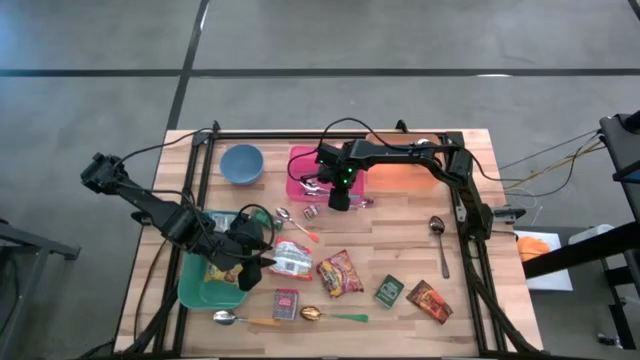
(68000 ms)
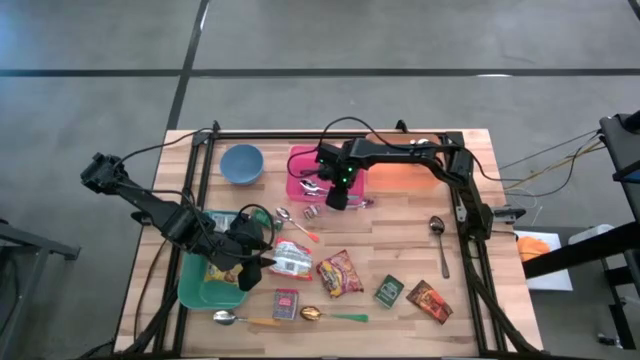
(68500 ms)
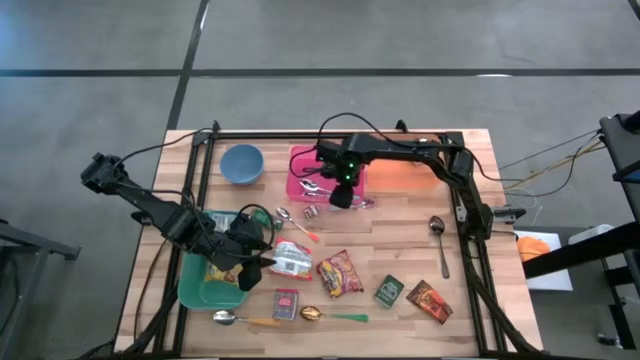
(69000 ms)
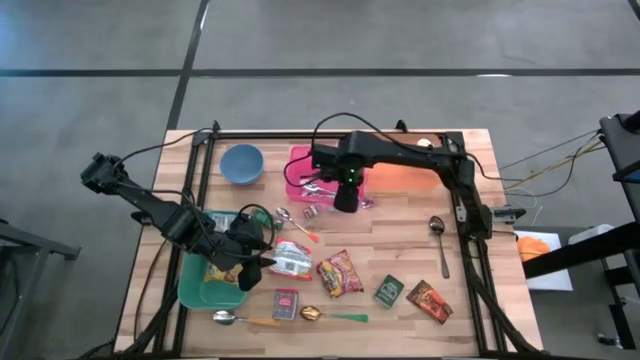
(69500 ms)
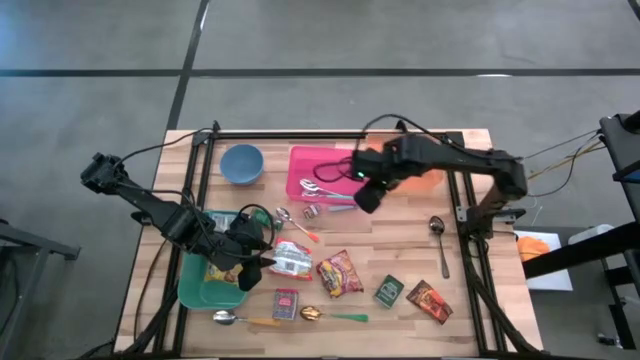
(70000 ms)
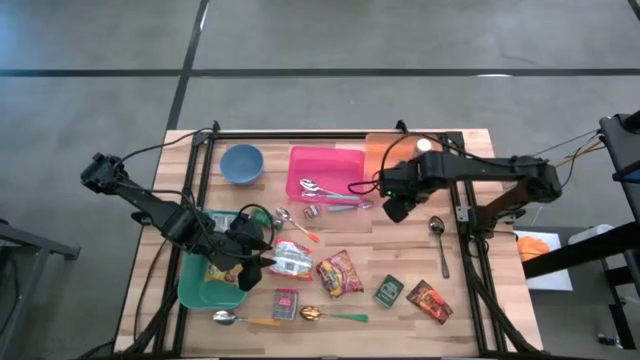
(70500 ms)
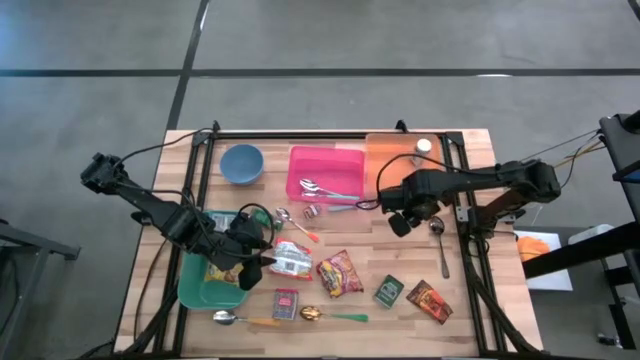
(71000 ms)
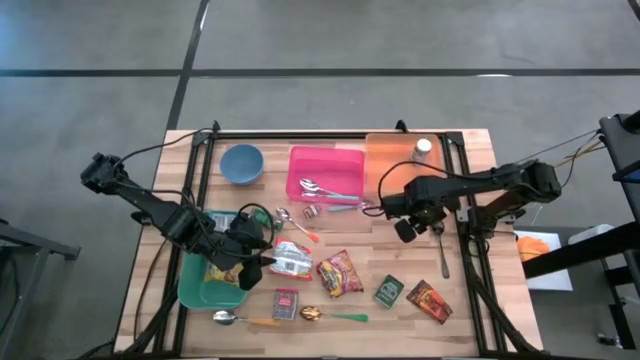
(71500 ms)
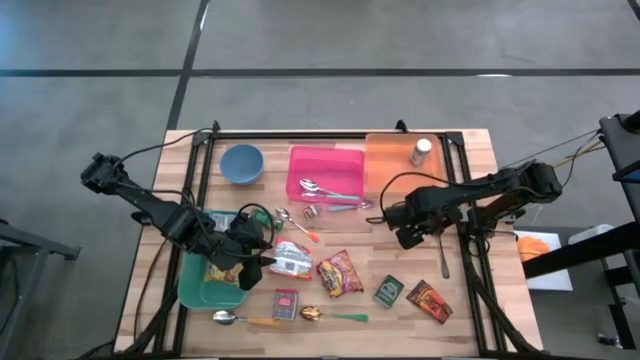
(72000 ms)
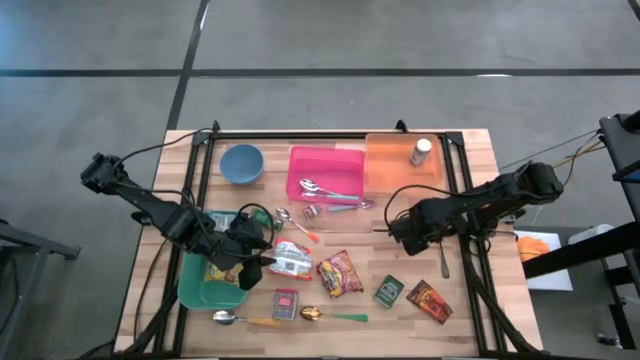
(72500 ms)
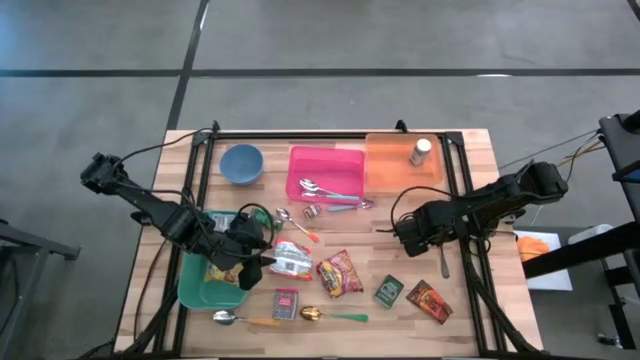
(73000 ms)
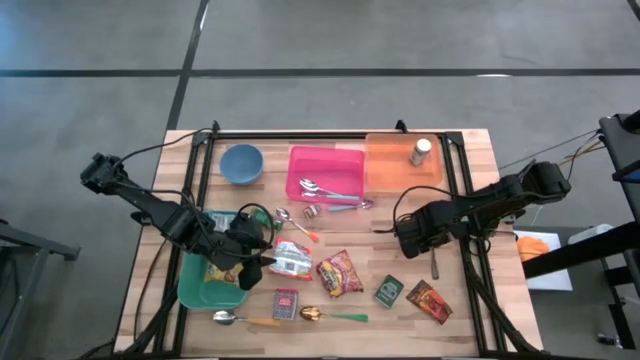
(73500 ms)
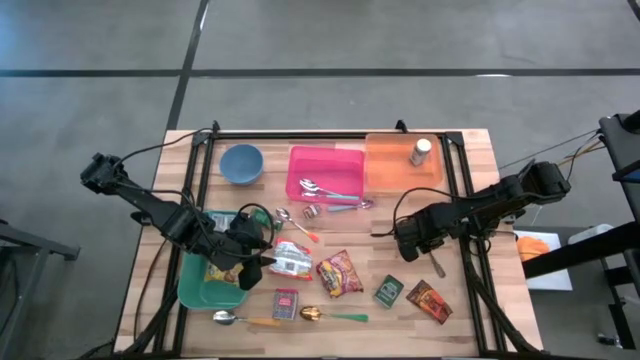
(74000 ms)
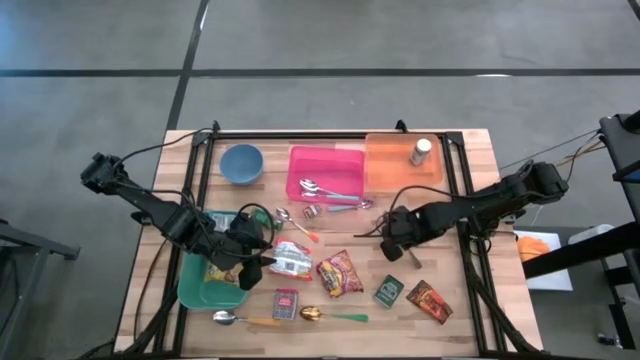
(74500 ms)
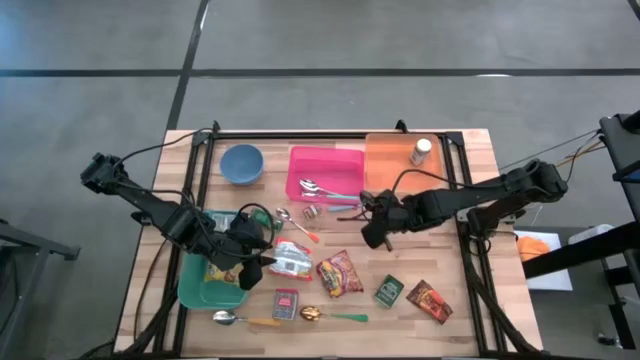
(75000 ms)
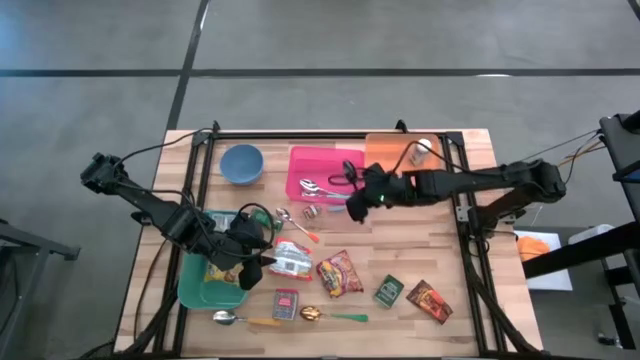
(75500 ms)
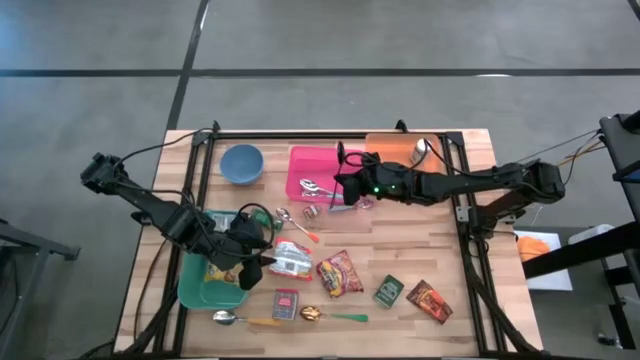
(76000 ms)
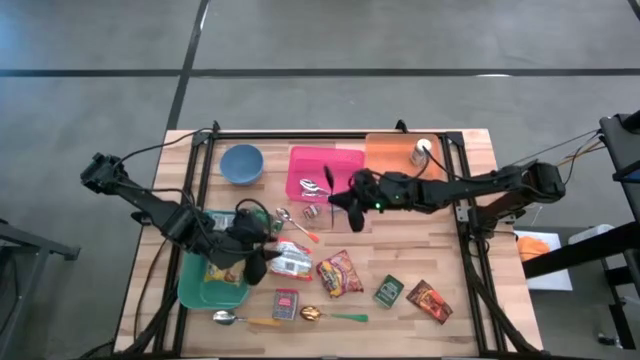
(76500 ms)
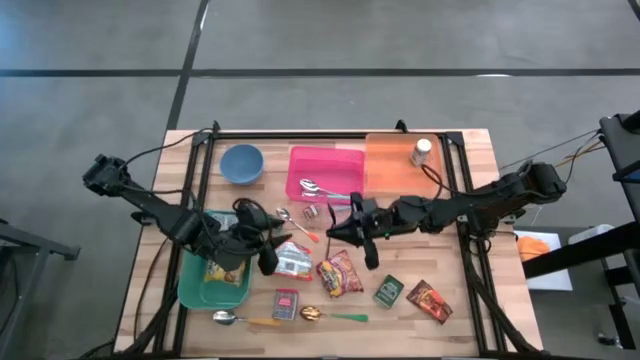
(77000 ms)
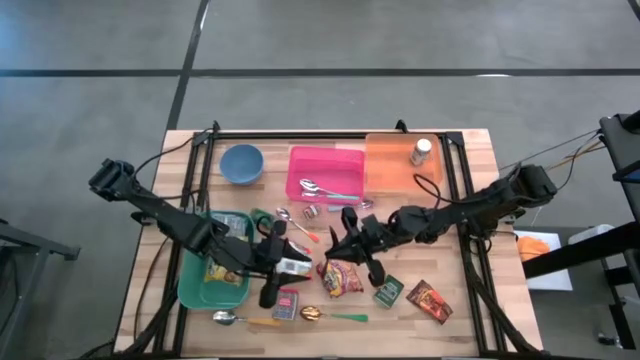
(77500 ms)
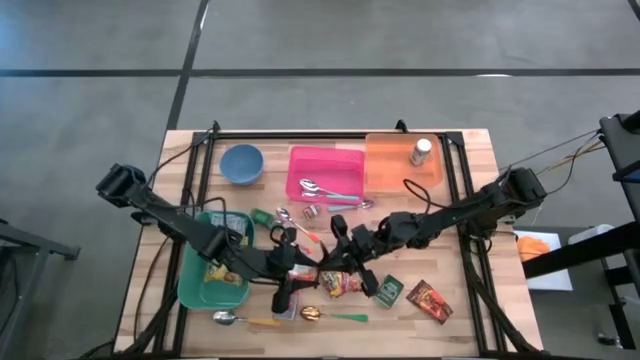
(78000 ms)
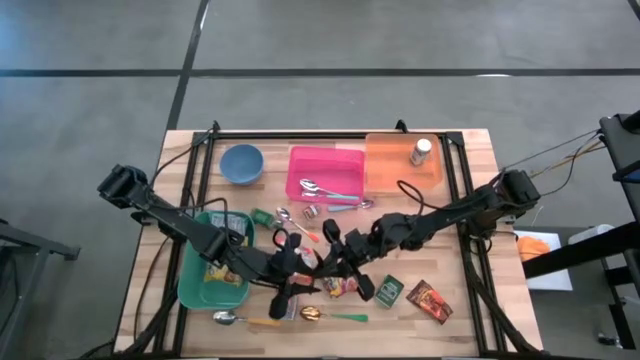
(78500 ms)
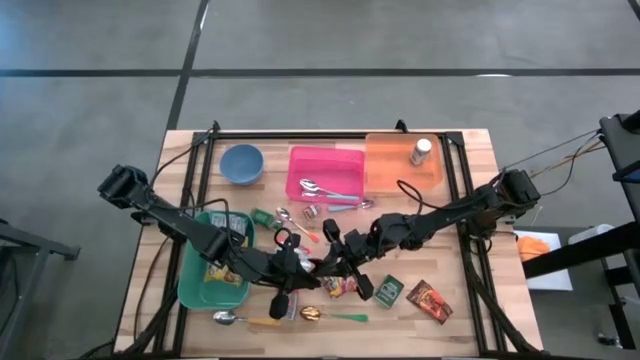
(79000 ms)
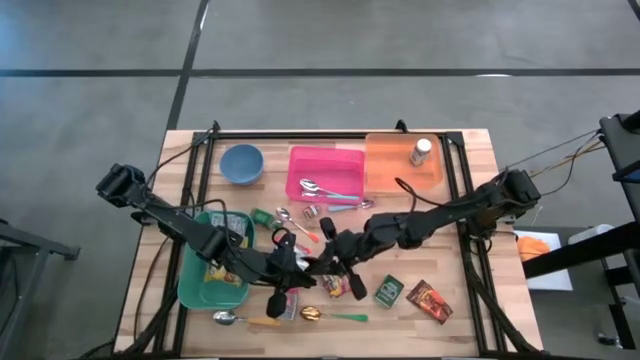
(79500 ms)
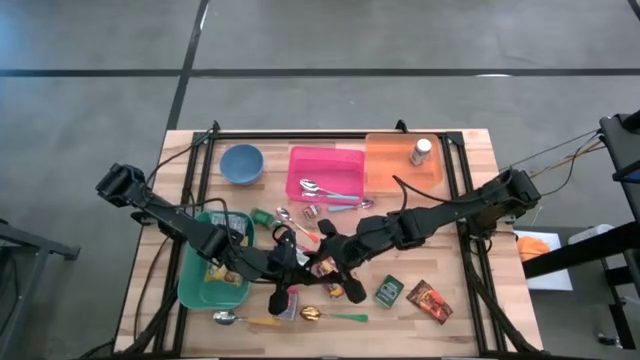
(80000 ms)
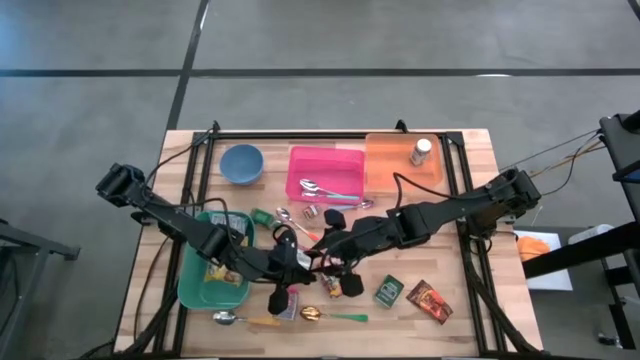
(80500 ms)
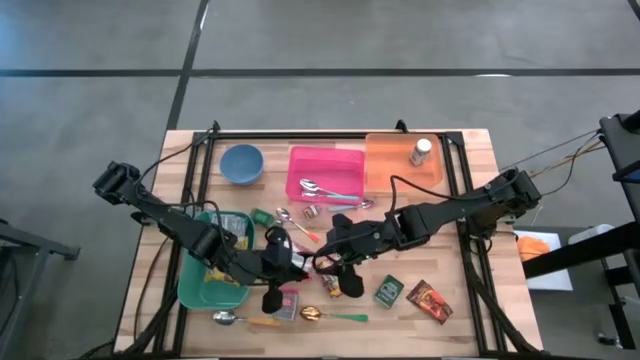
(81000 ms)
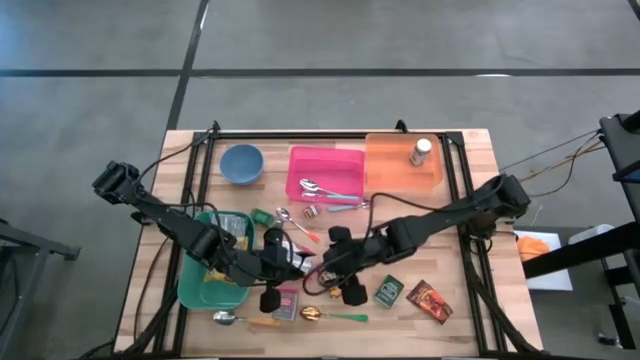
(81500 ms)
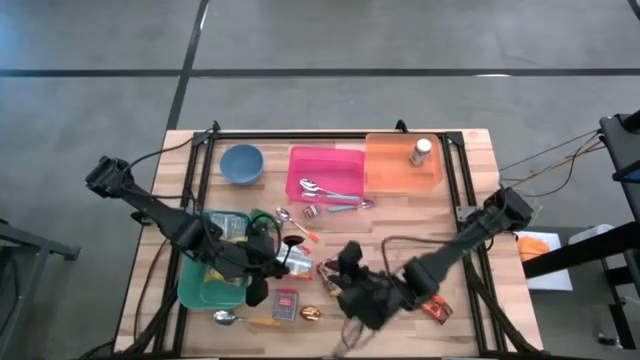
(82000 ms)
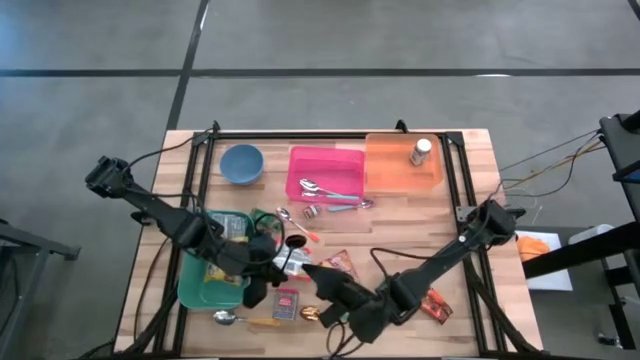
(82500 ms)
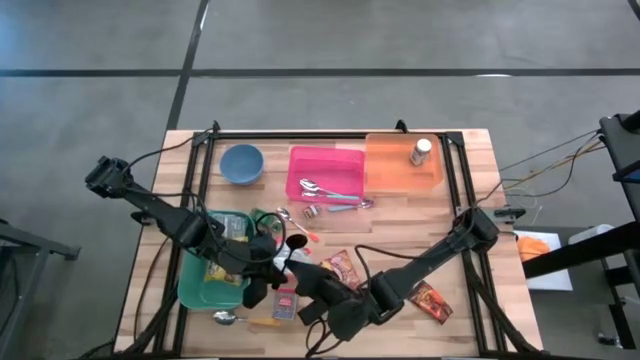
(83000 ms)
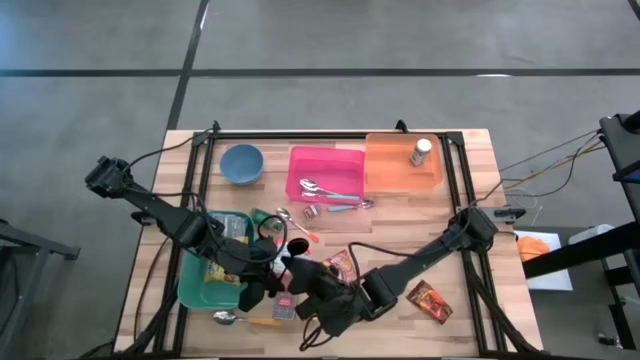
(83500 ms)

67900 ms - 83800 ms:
Put the black spoon into the pink bin

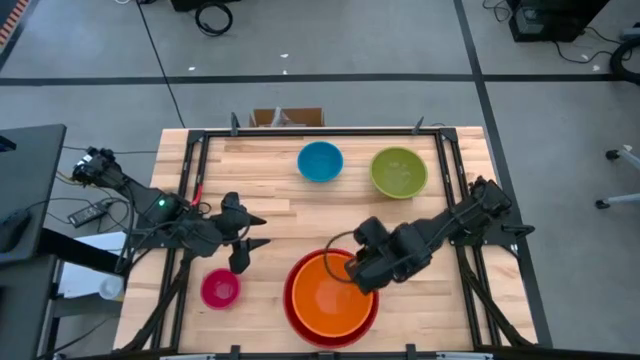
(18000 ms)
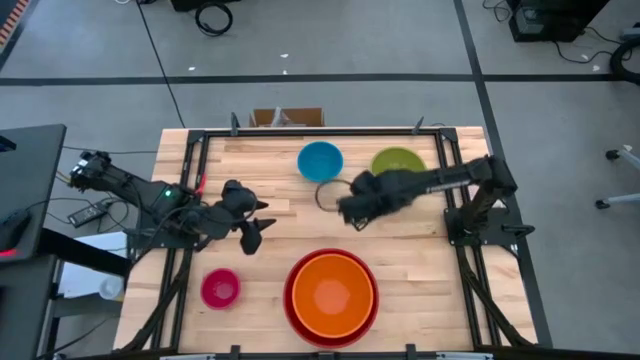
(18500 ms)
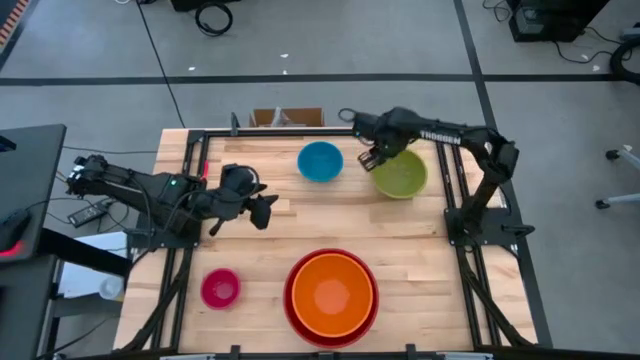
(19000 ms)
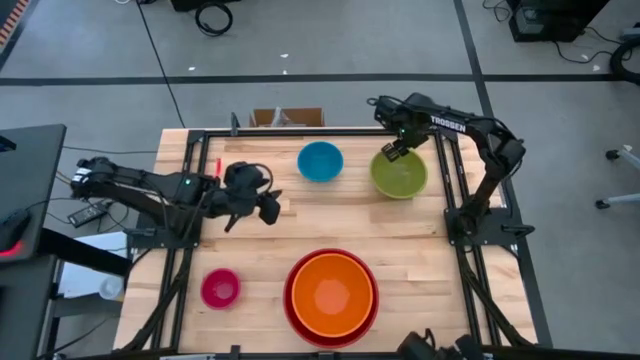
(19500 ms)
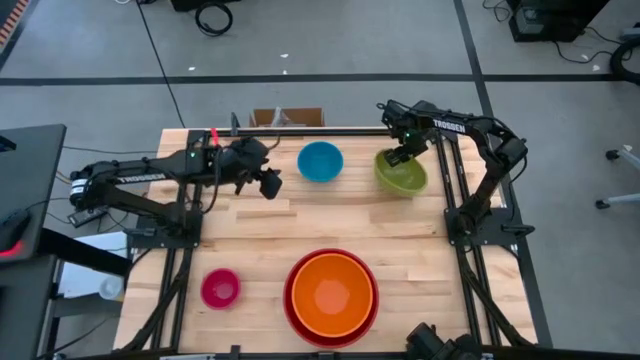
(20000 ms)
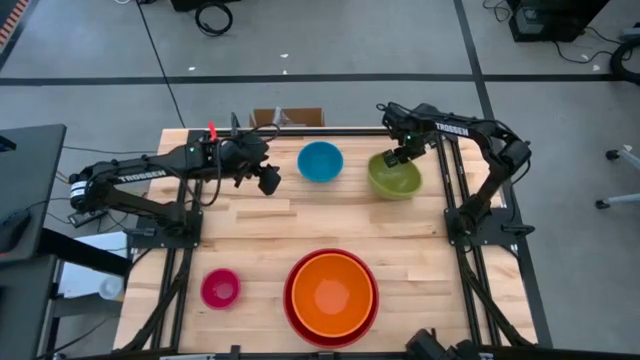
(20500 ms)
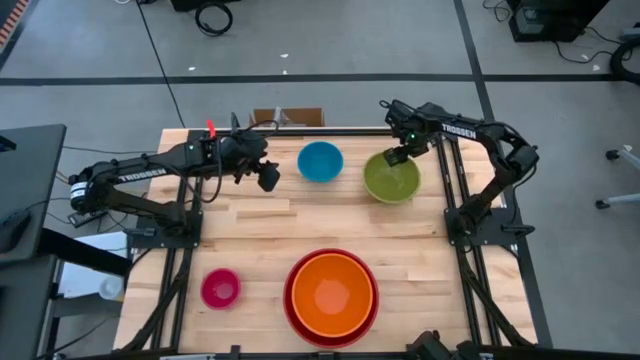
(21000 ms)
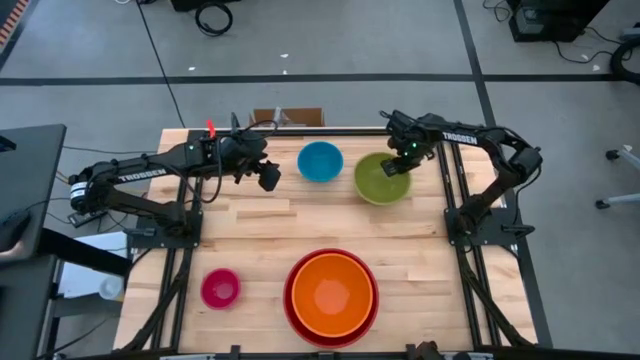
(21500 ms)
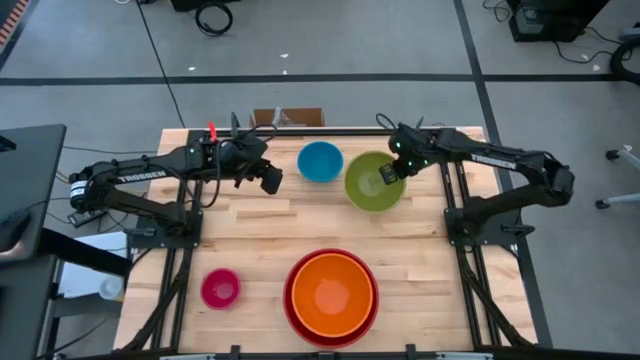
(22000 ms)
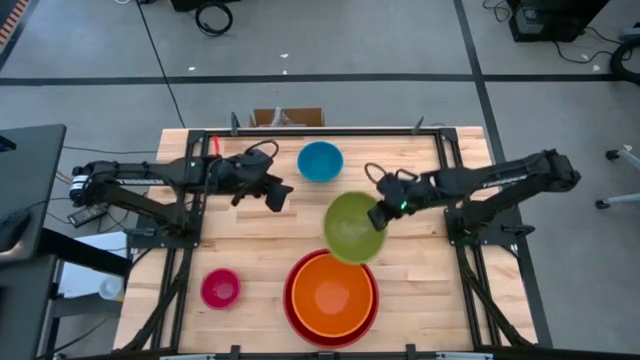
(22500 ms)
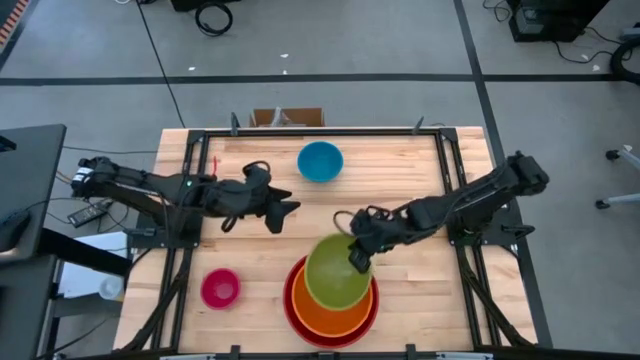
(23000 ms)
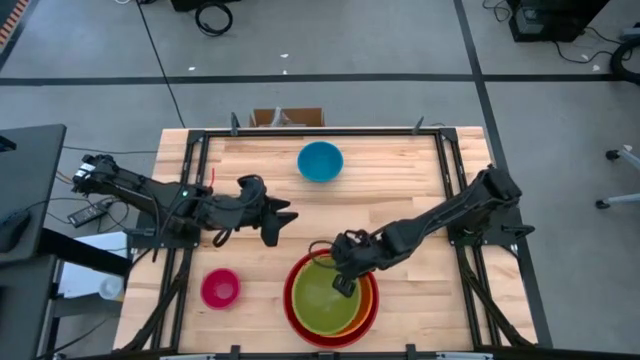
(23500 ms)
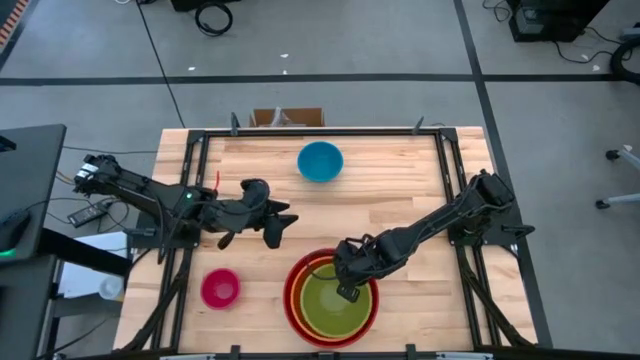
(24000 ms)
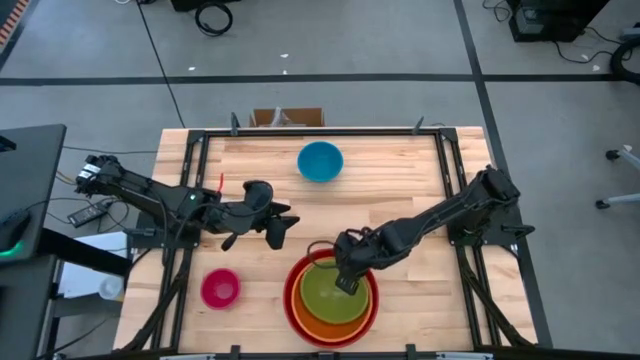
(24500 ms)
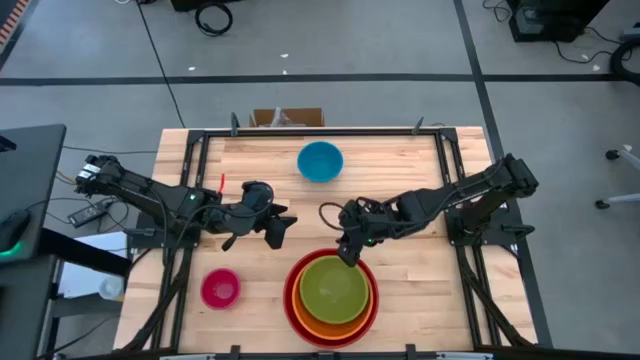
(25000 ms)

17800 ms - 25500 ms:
Stack the green bowl on top of the orange bowl
